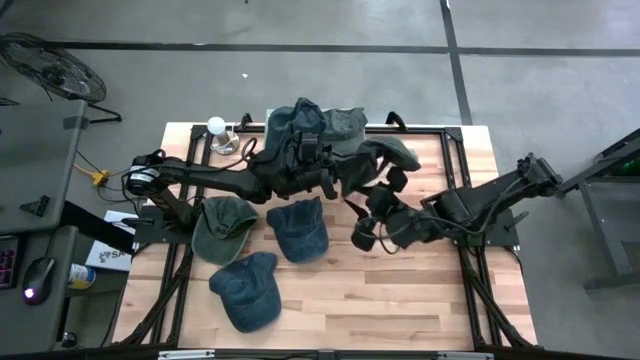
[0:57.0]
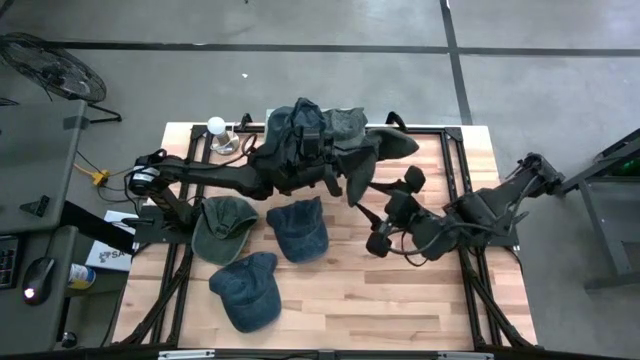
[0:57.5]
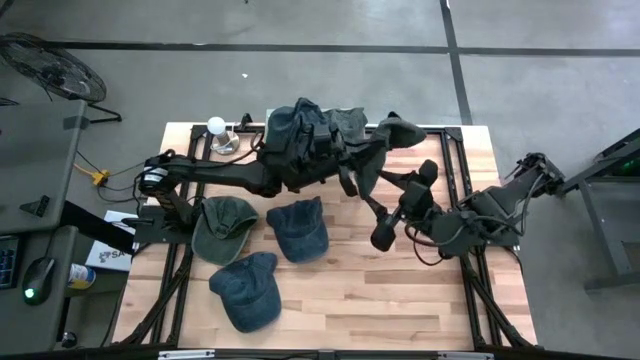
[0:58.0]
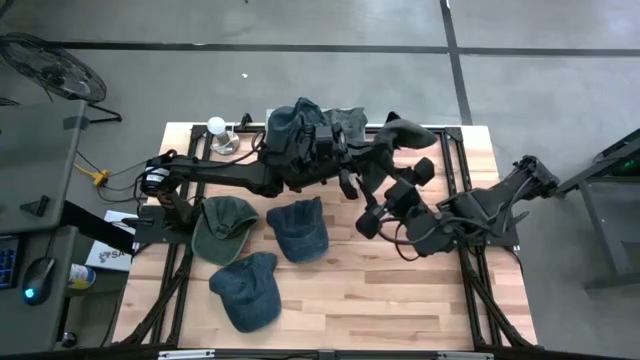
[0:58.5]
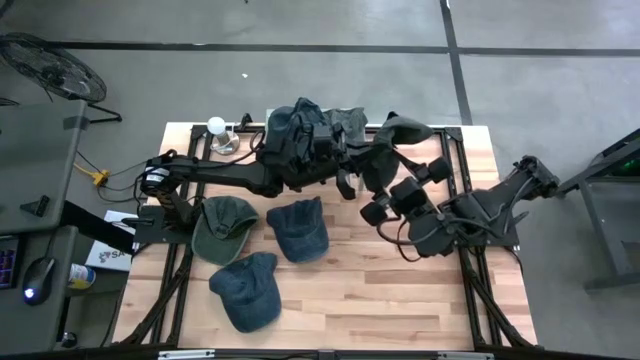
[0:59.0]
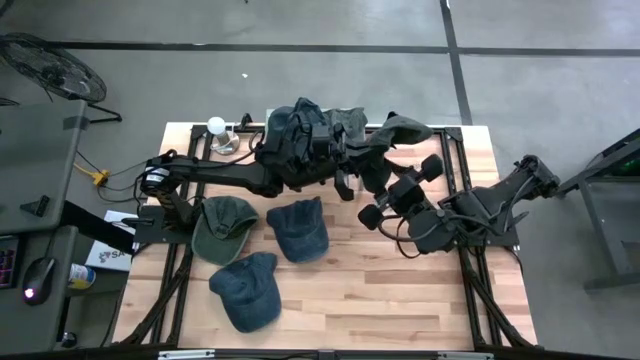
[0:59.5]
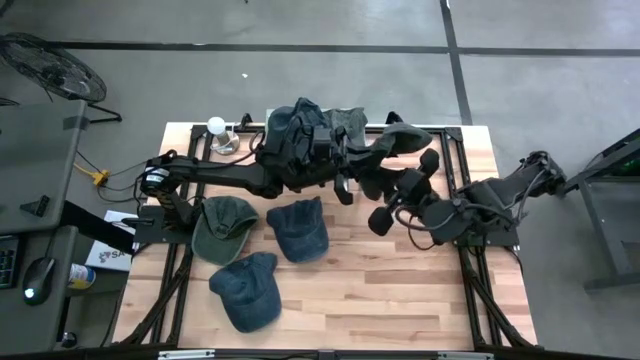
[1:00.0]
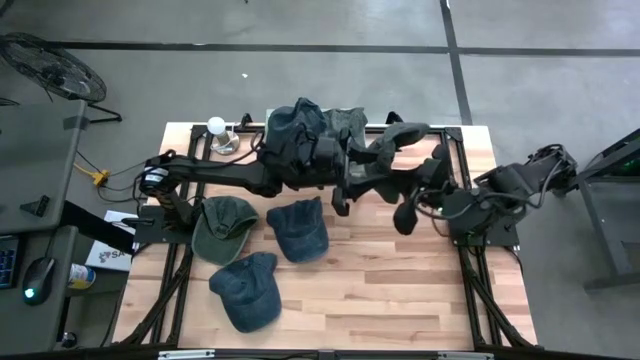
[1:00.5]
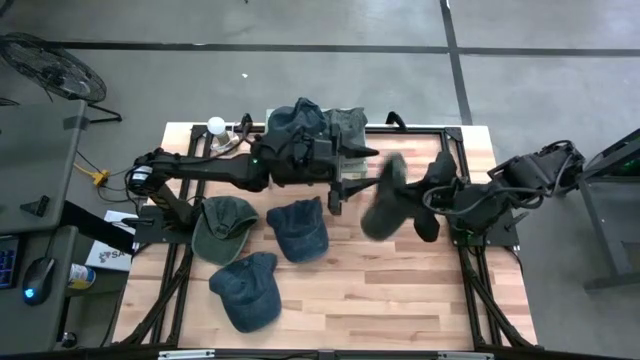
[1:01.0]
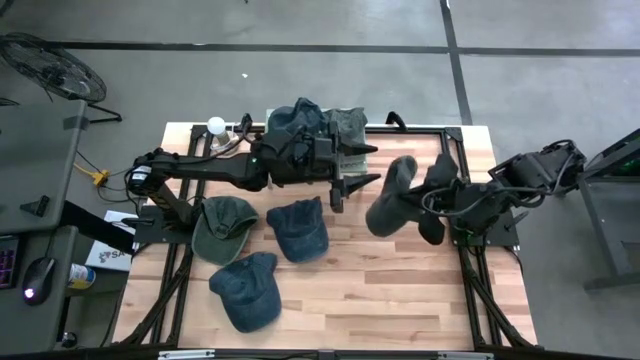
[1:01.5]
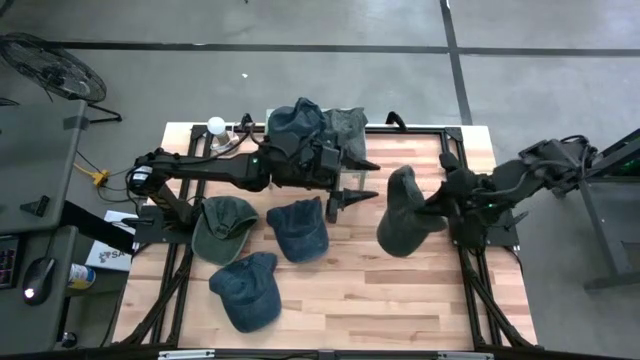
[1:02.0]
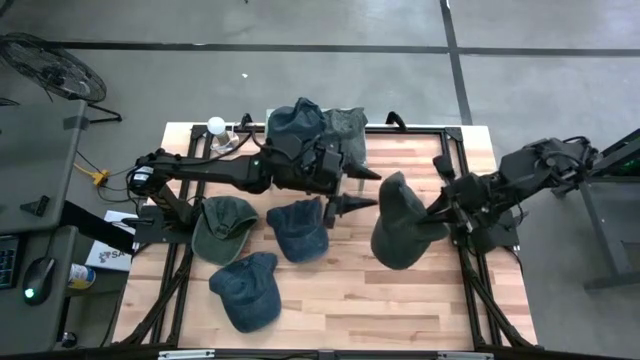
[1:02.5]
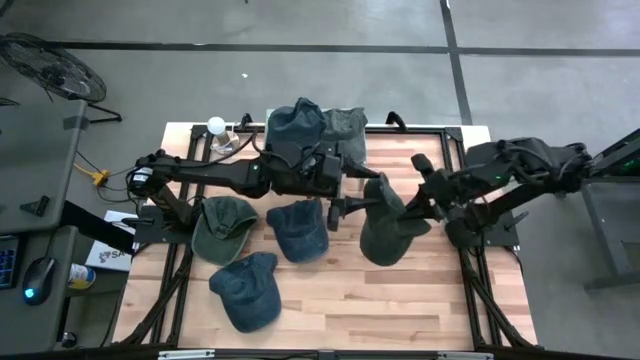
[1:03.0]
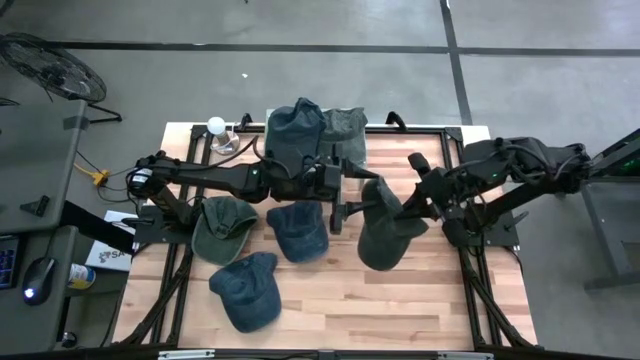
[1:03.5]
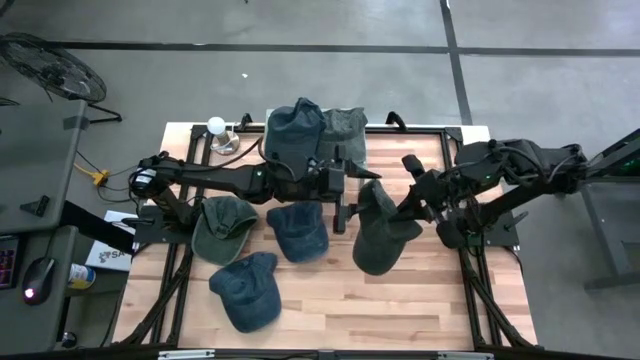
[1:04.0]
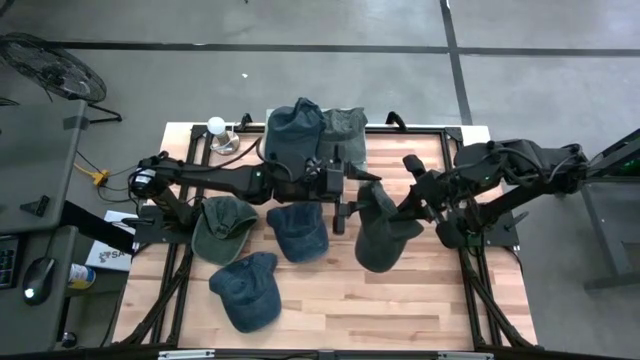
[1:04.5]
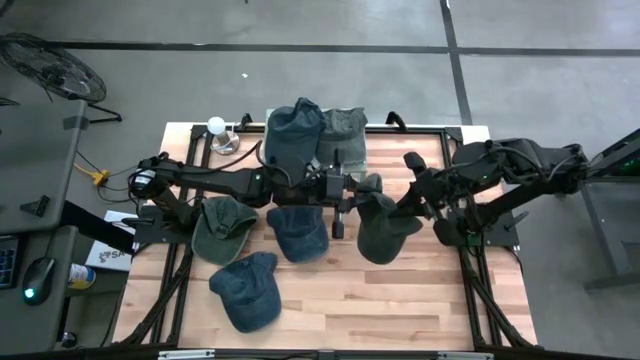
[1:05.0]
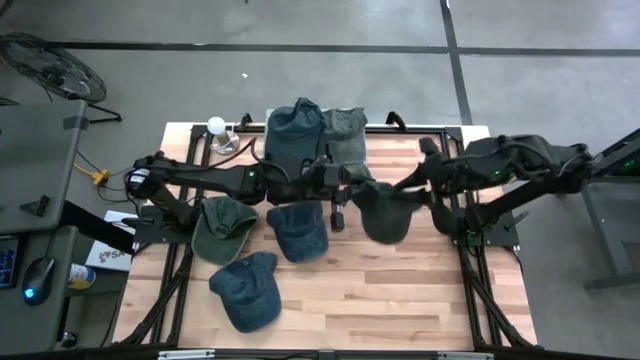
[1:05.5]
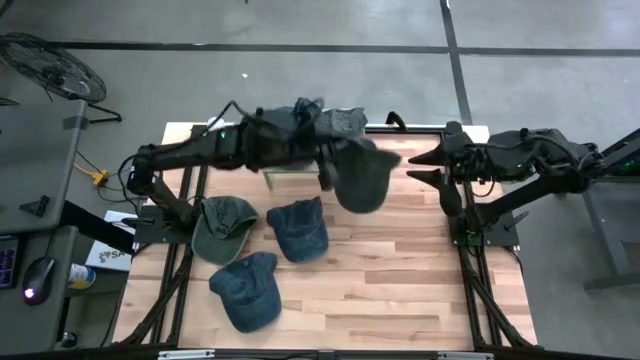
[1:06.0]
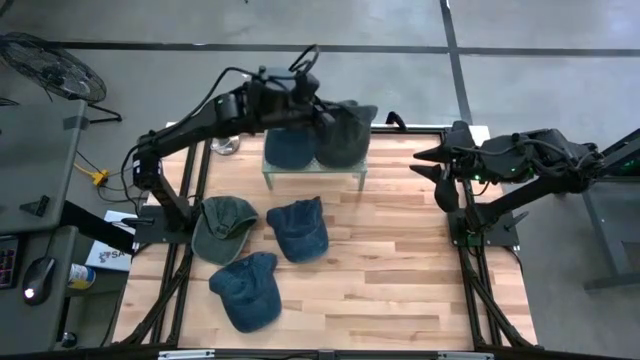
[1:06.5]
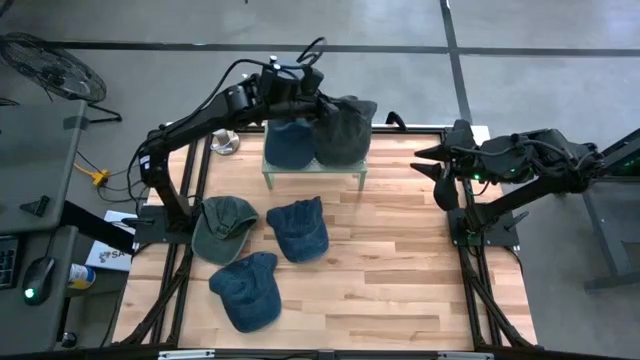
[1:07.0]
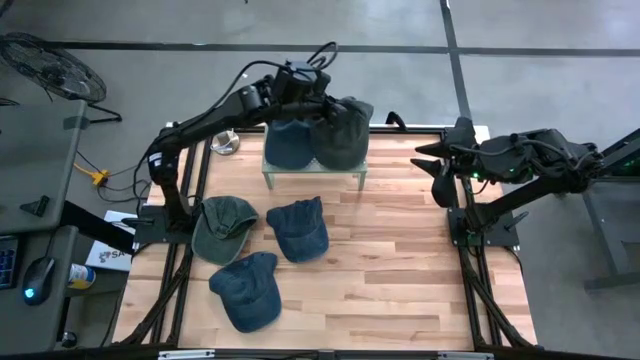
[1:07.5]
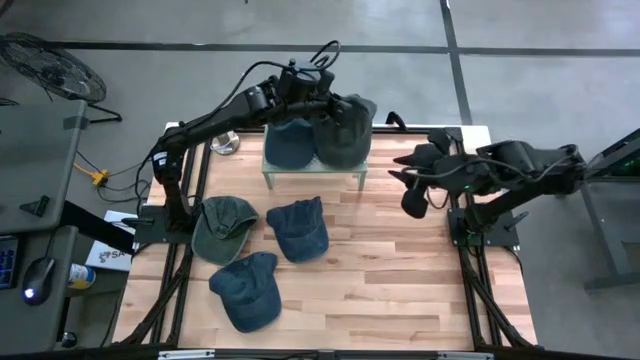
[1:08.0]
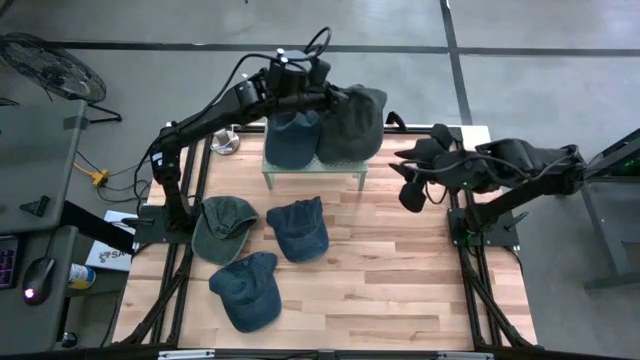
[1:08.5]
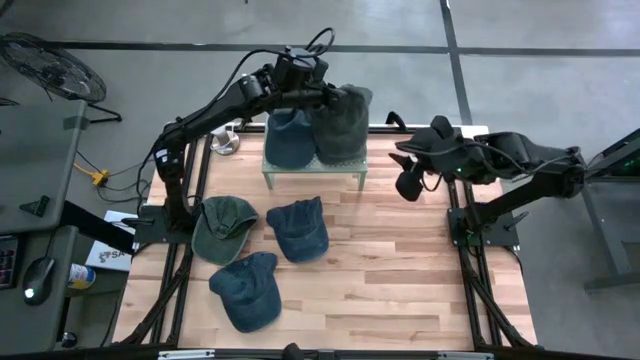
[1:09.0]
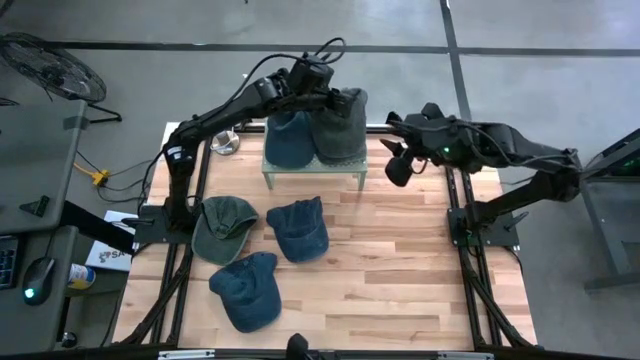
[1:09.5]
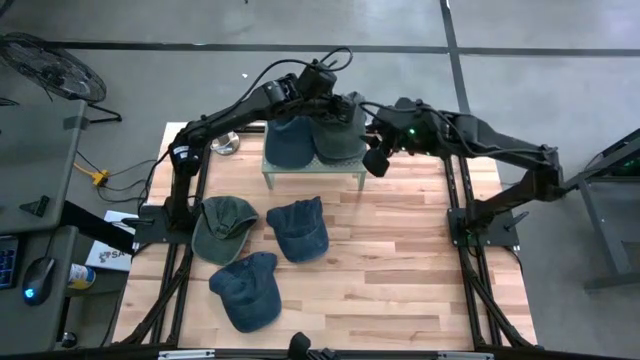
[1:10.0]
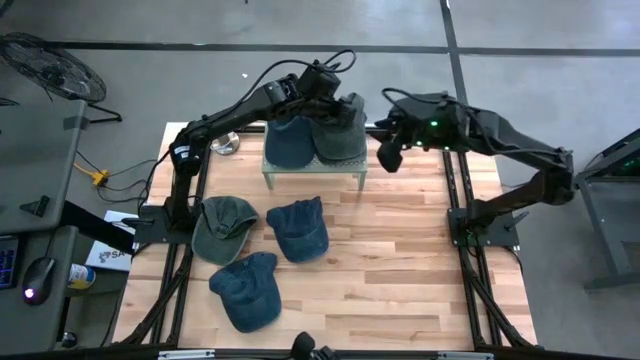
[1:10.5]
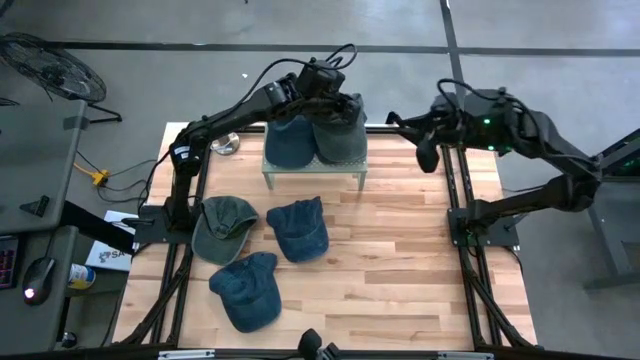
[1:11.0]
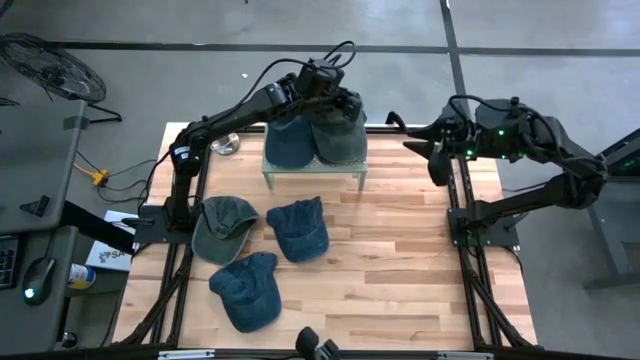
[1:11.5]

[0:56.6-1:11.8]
Task: Pick & Place hat
Stack the right gray cap on the gray cap on the shelf

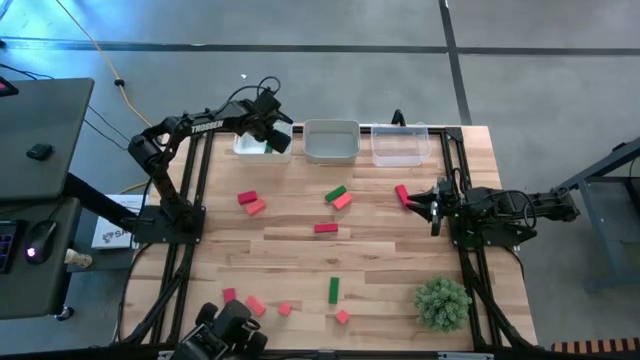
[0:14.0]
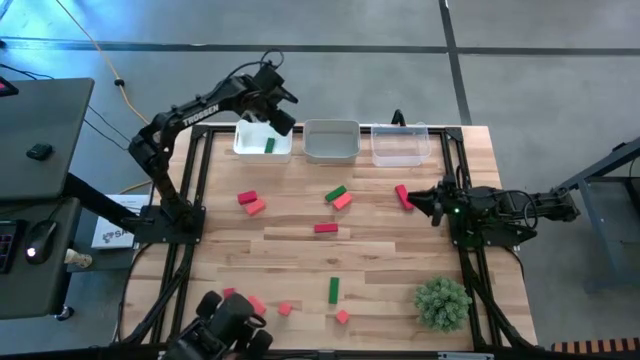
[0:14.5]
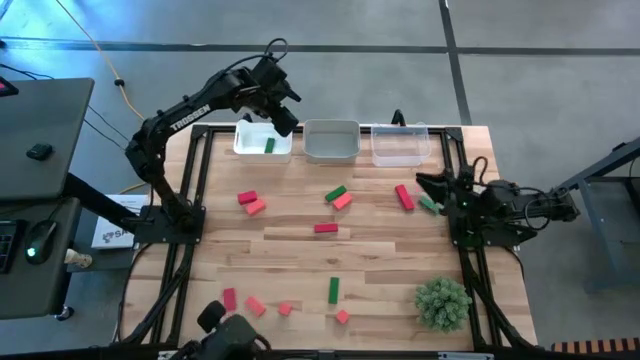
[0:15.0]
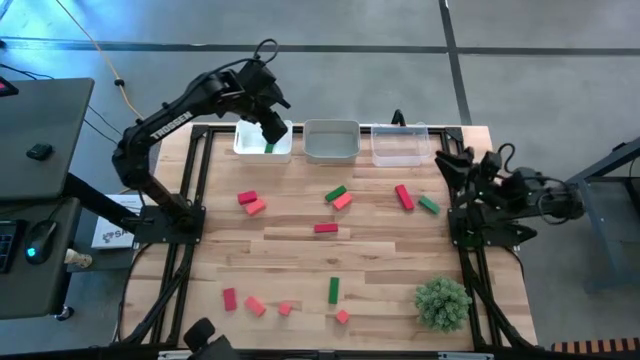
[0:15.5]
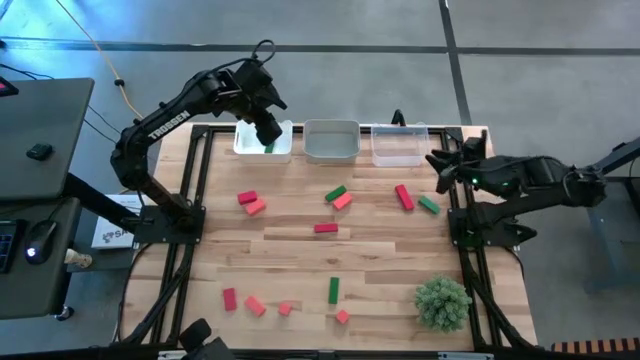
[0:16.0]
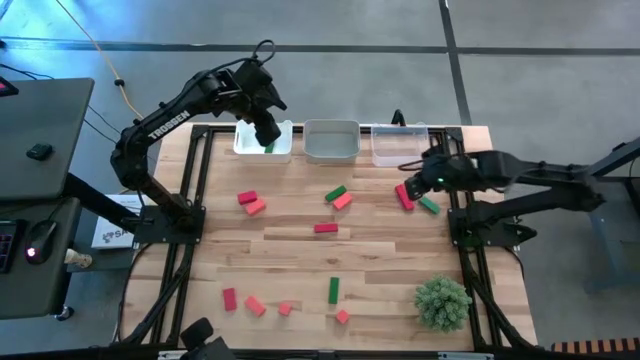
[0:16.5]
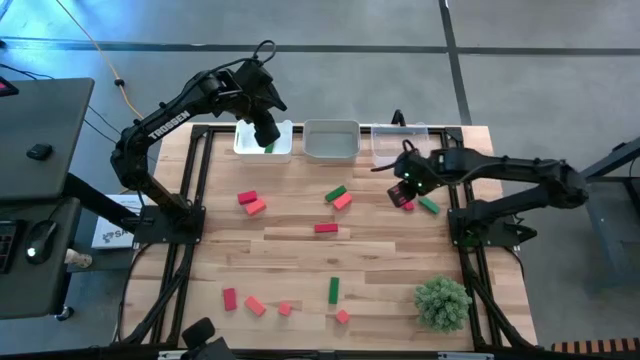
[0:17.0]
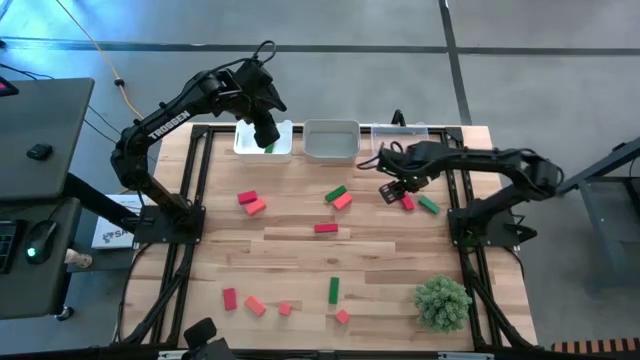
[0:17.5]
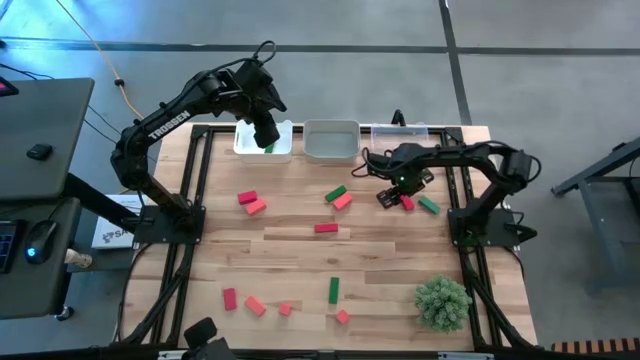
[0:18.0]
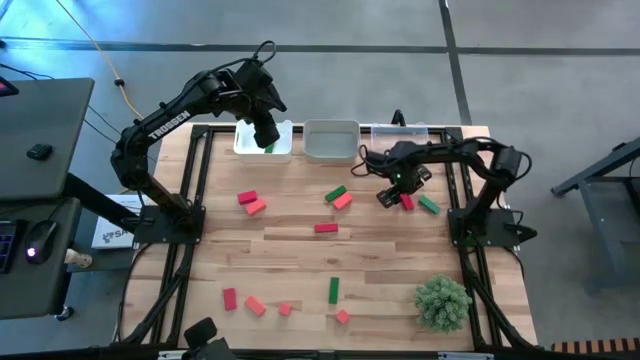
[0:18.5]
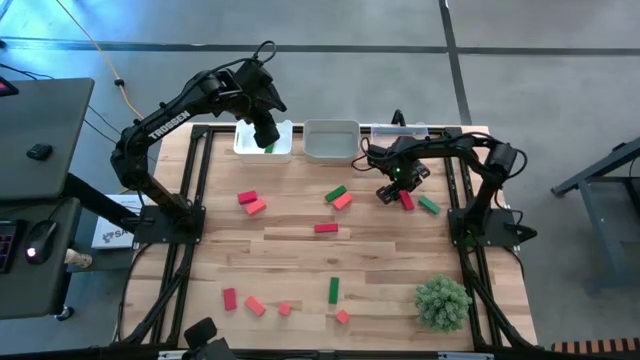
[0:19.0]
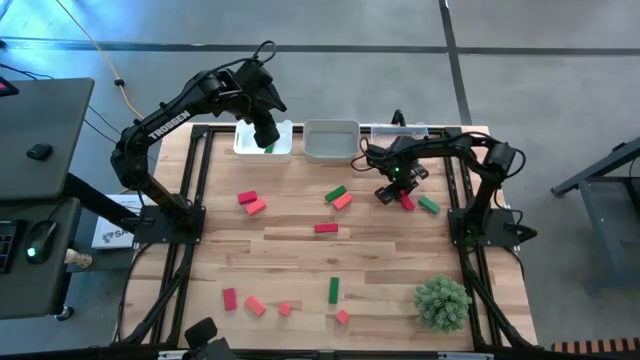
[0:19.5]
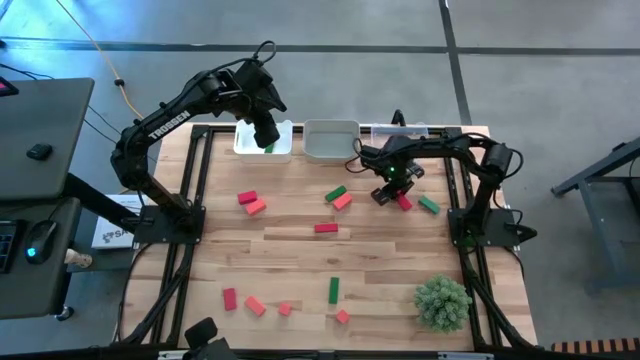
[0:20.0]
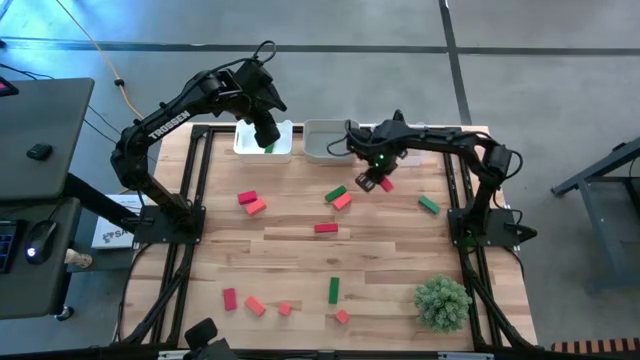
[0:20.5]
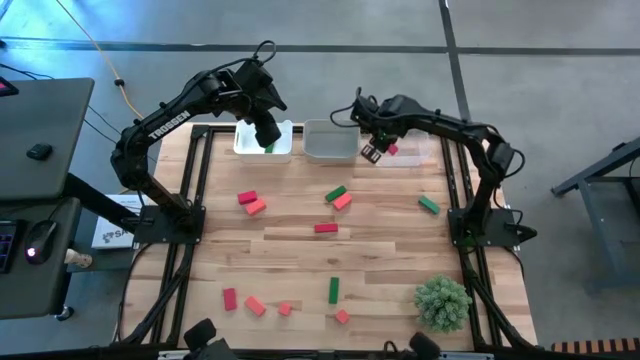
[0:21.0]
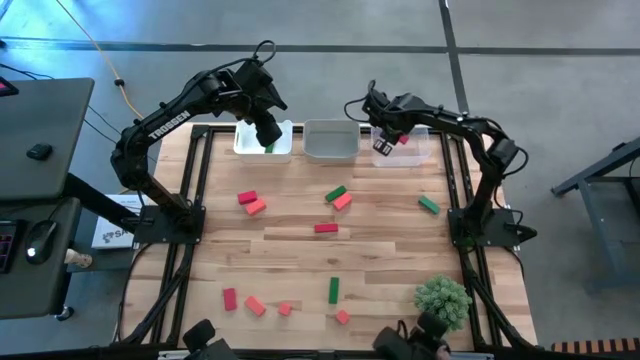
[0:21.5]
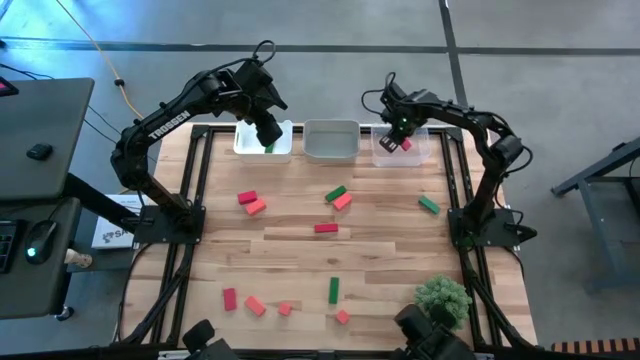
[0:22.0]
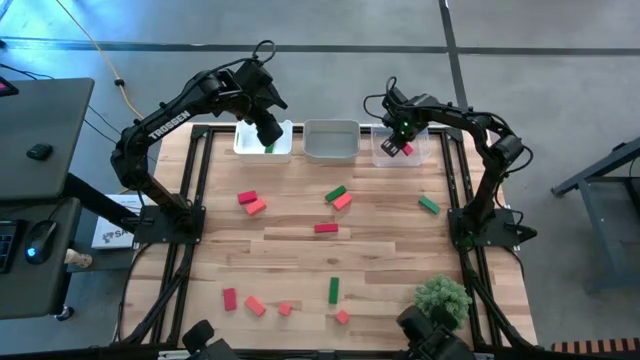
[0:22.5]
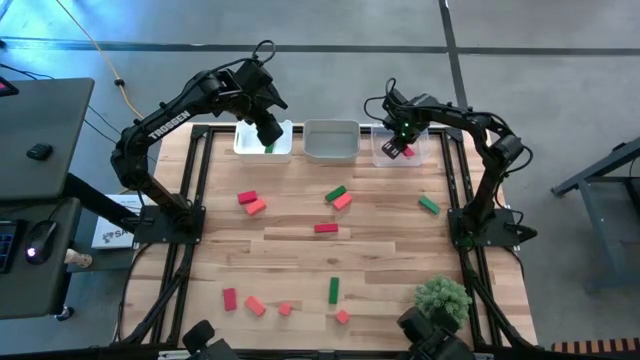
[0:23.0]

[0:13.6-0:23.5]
Task: Sort & place blocks by color
Put the red wooden block into the transparent bin
